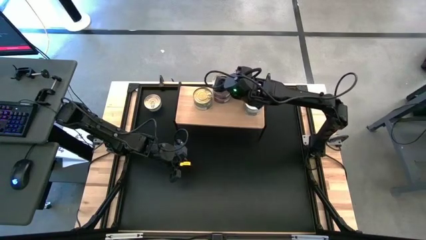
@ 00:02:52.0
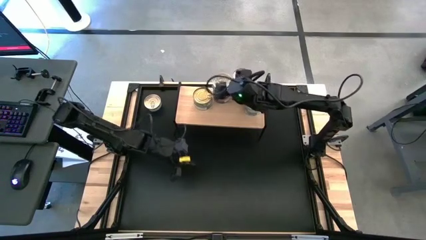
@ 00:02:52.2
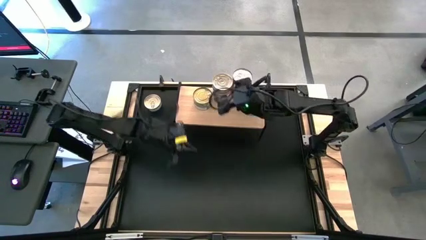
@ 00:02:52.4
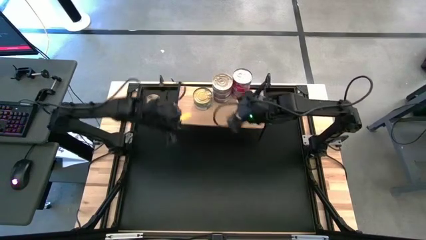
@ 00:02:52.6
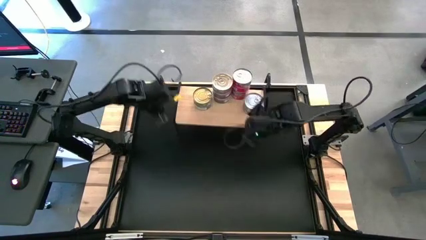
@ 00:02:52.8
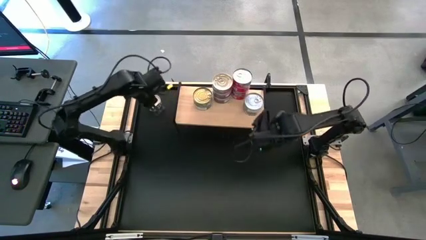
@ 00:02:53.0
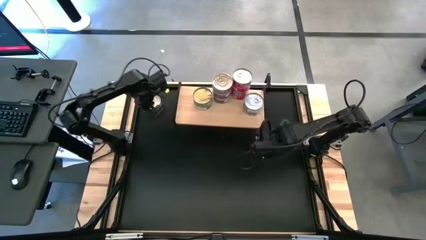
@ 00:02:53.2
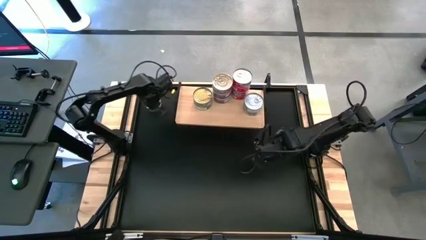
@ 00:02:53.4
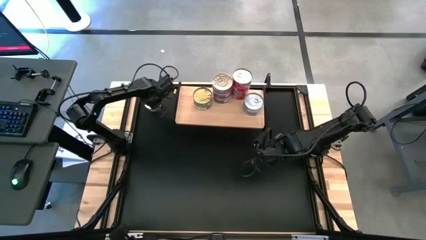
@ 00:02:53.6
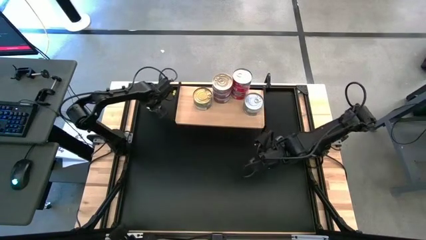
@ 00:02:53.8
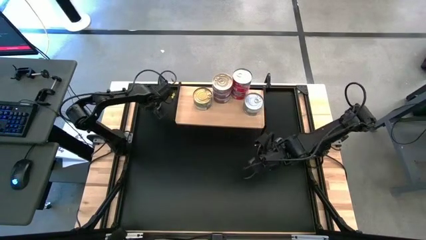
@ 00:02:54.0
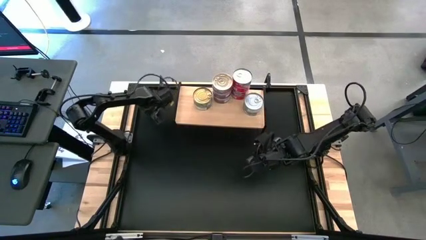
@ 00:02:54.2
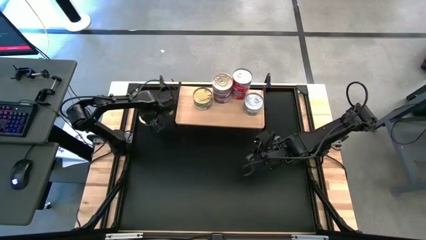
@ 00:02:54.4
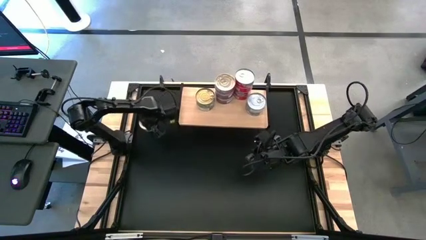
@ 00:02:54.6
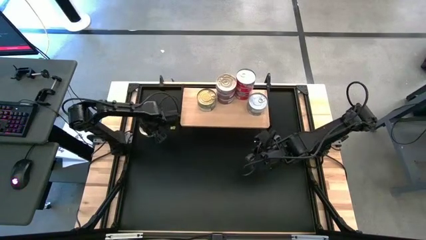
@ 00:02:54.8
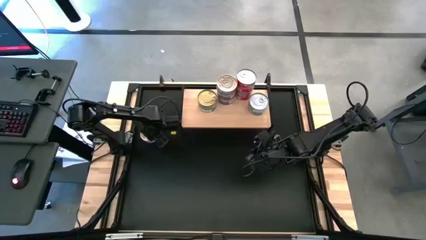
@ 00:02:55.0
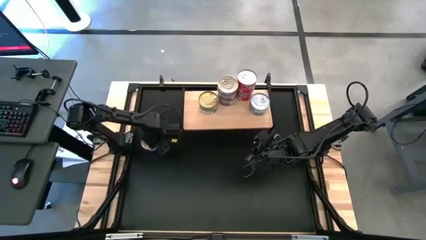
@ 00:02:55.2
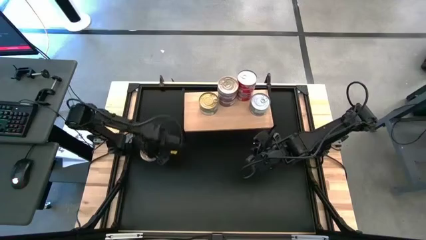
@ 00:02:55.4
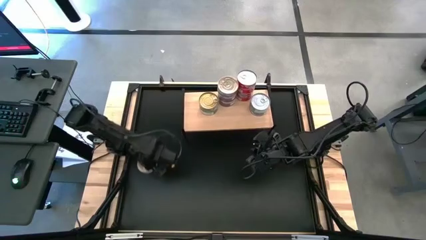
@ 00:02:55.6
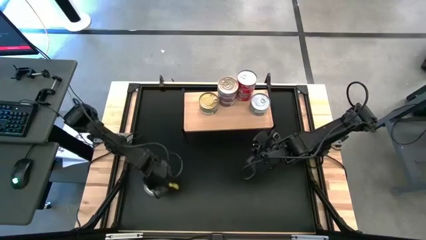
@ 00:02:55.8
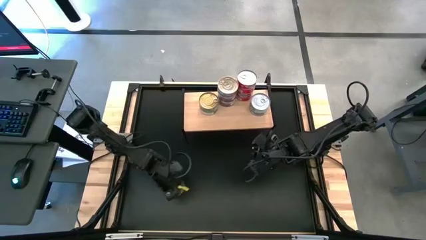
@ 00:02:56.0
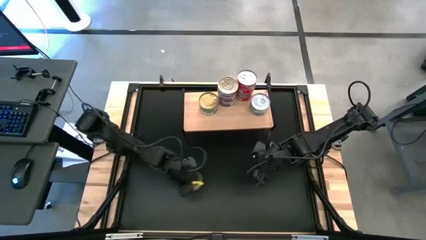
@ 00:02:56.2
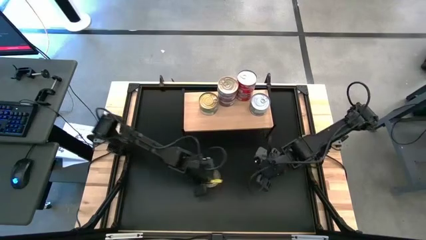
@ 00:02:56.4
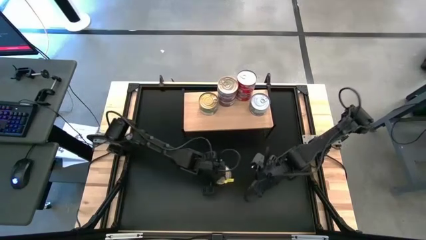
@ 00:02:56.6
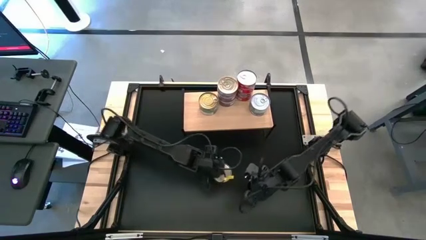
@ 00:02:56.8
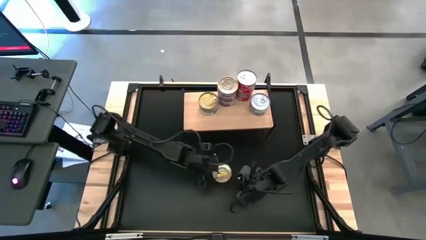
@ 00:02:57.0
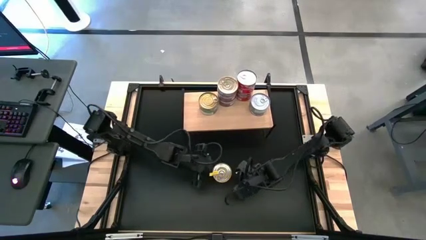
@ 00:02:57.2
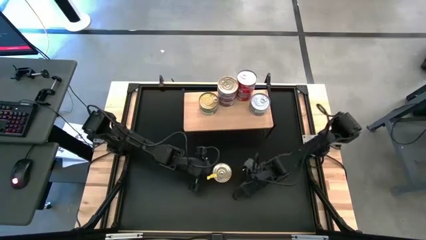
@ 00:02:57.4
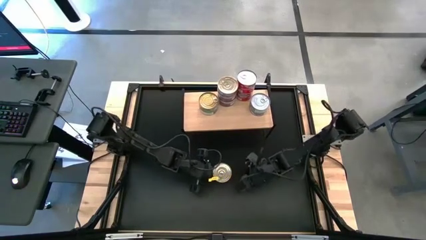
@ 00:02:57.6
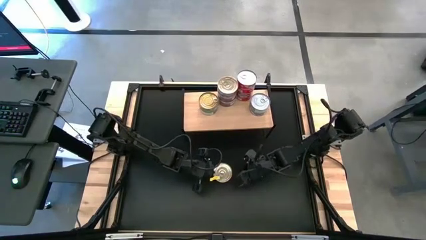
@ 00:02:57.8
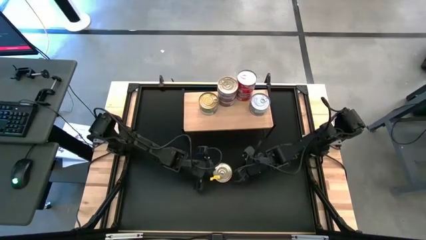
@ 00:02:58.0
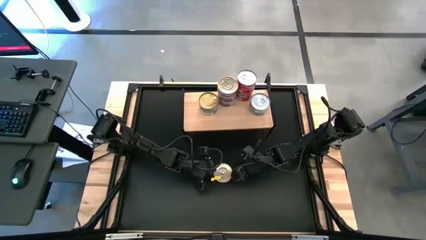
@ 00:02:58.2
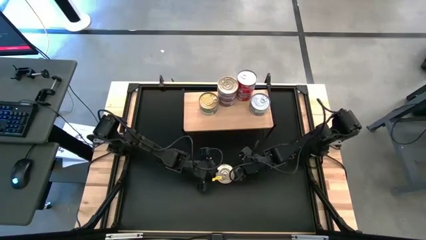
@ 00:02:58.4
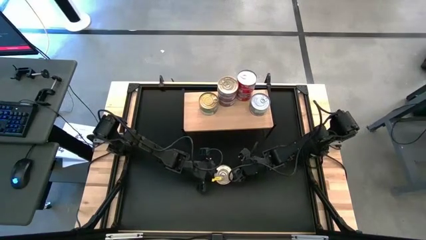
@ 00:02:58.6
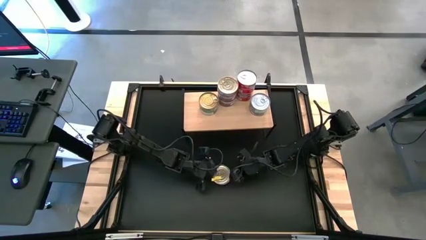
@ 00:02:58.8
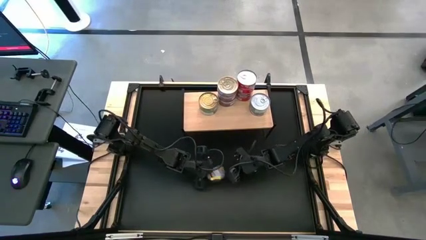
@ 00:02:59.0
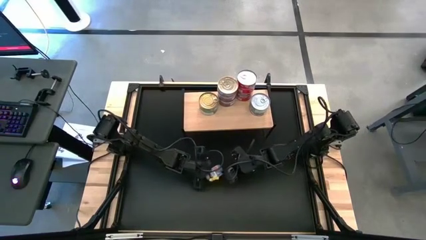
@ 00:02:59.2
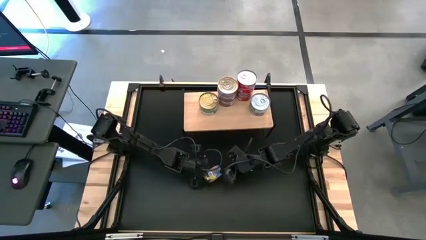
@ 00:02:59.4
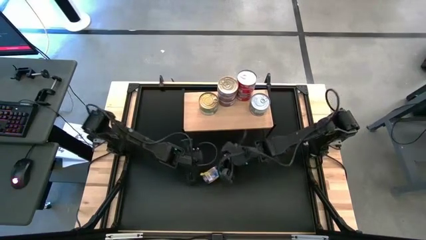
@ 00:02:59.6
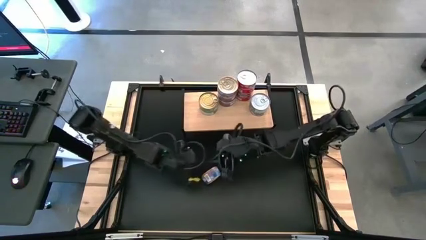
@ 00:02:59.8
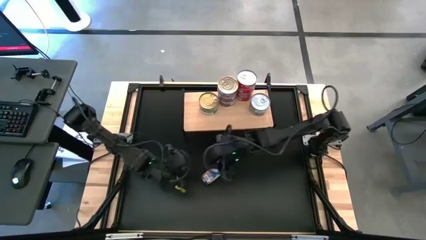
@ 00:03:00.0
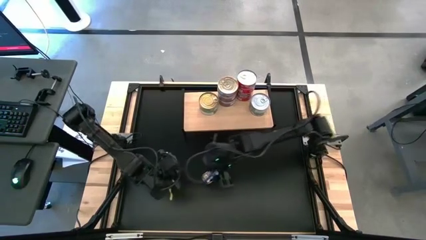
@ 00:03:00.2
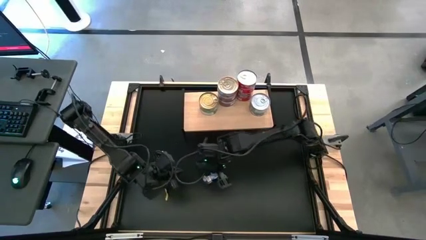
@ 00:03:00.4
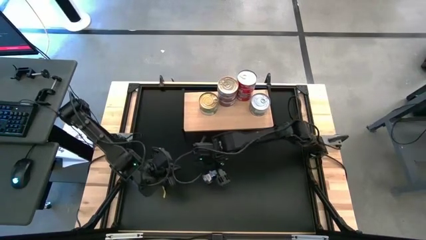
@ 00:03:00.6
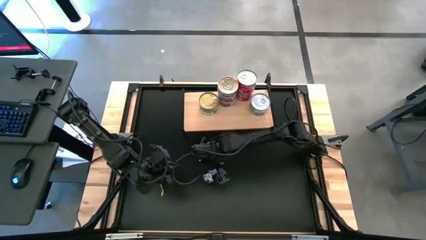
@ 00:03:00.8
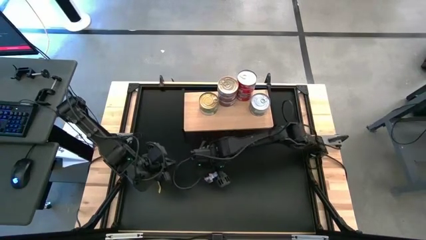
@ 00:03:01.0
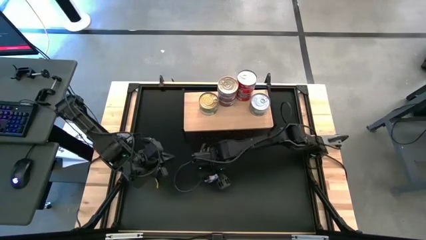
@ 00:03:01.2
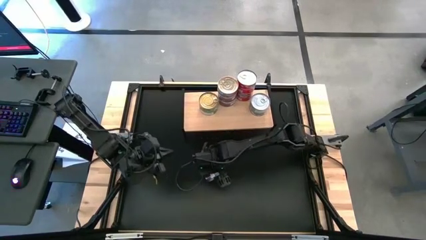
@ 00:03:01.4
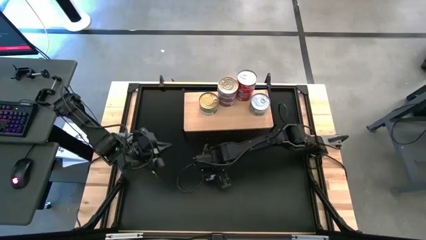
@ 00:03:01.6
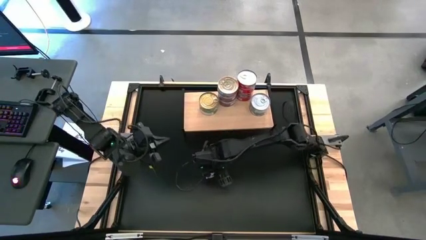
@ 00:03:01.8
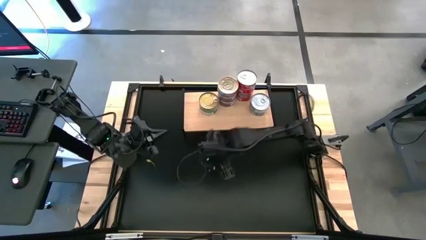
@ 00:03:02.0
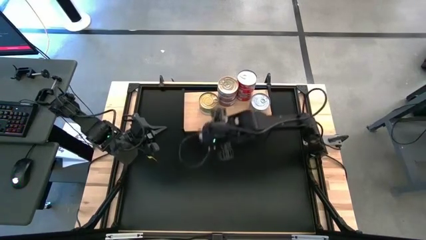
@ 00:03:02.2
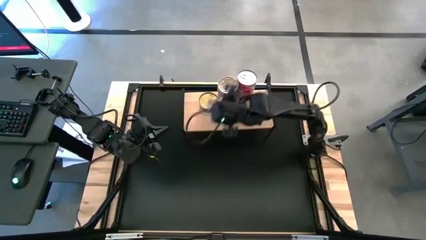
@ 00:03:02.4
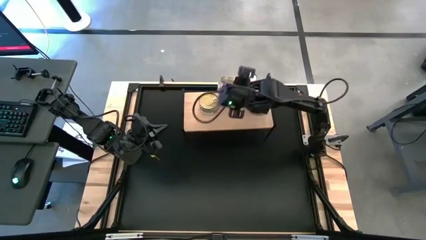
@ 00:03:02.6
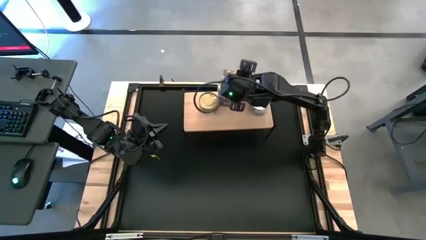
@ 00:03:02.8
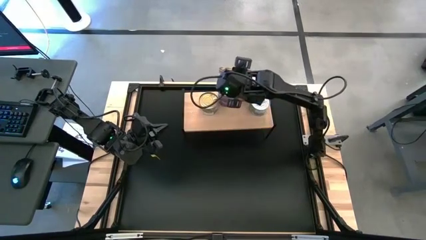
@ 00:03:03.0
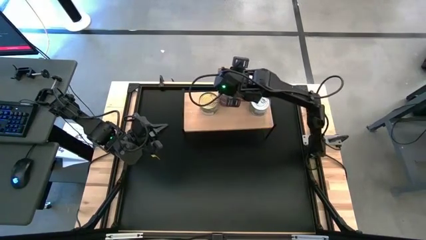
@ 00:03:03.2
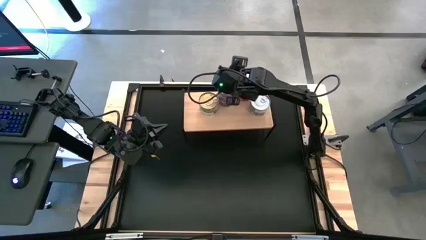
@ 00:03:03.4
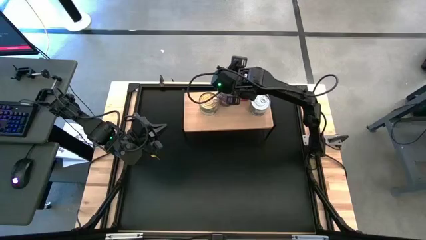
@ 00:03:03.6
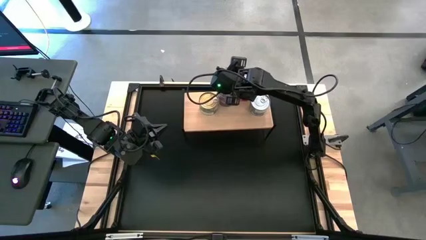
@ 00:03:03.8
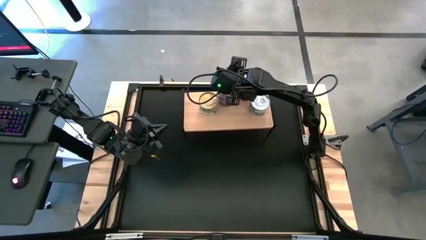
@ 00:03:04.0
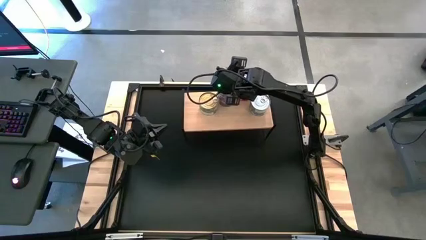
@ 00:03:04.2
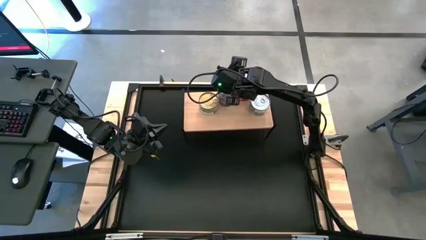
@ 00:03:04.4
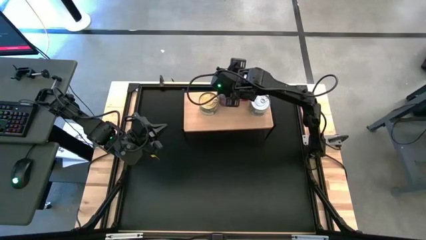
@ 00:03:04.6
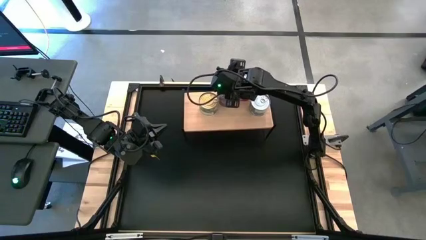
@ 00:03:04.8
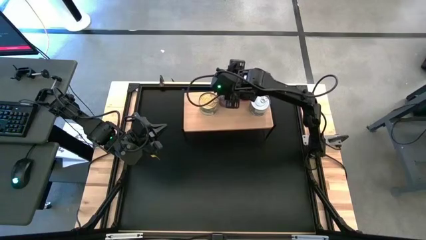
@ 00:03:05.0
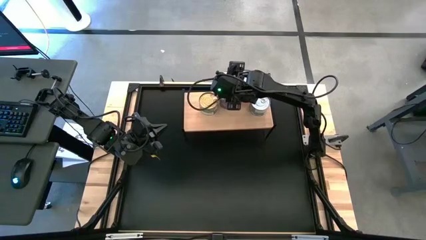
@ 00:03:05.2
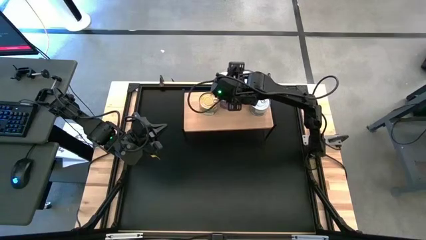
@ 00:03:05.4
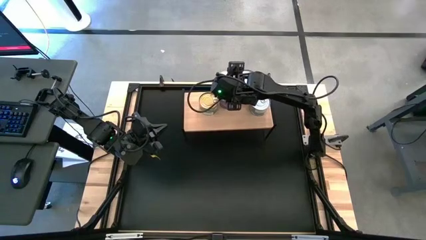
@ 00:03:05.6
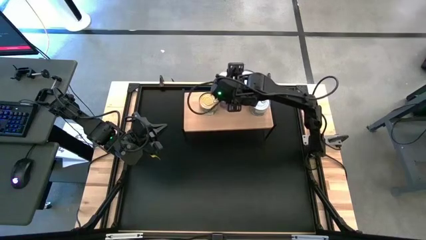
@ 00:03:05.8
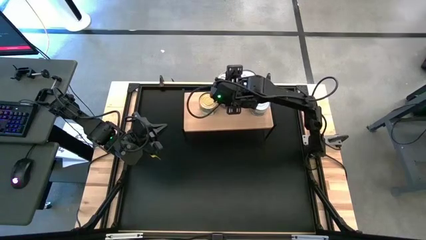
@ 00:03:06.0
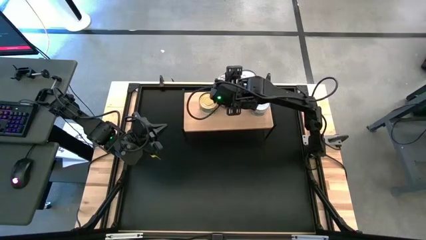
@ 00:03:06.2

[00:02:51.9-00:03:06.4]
Task: Stack canned seafood by type on shelf
Stack the blue tuna can on top of the blue tuna can on the shelf
